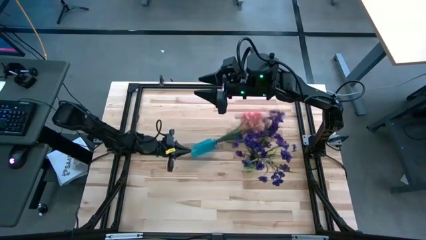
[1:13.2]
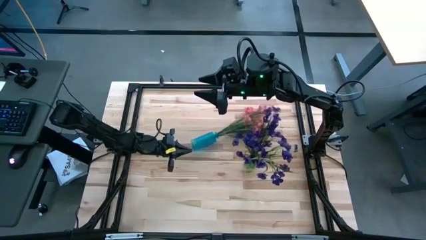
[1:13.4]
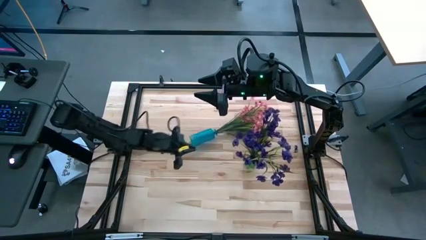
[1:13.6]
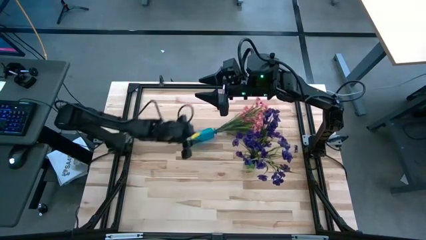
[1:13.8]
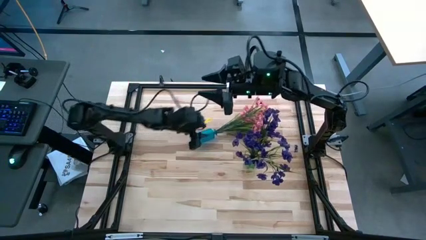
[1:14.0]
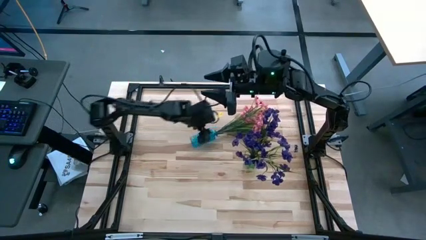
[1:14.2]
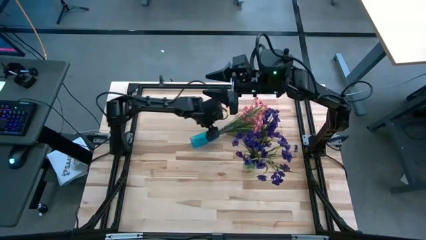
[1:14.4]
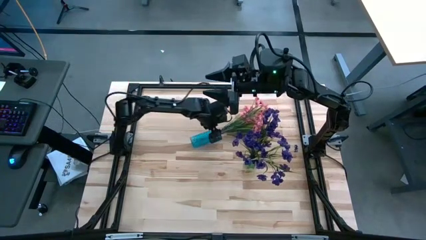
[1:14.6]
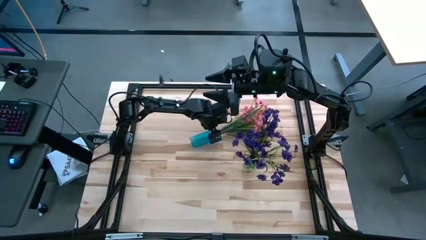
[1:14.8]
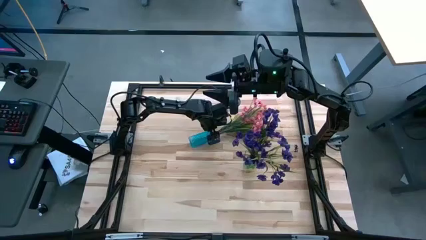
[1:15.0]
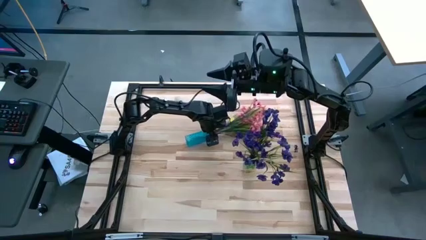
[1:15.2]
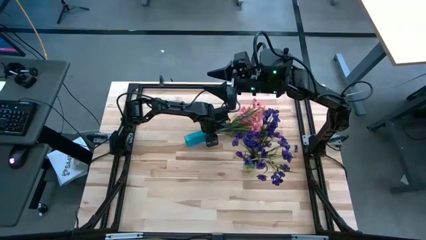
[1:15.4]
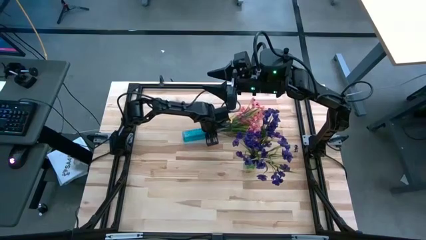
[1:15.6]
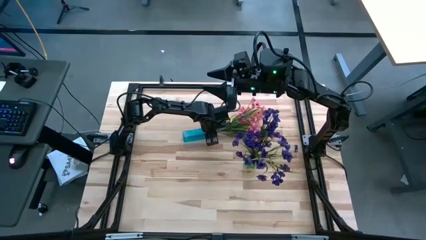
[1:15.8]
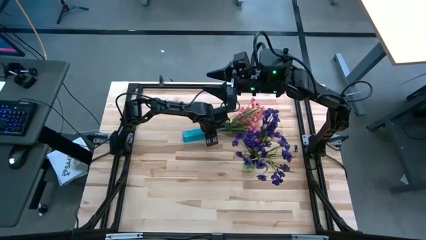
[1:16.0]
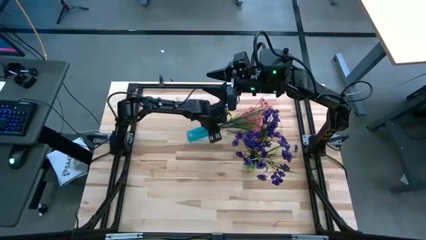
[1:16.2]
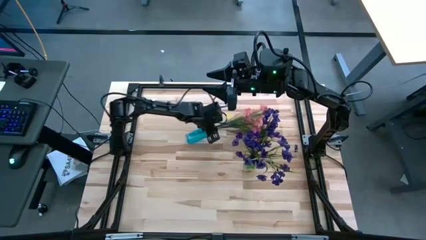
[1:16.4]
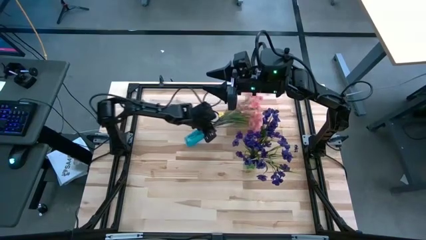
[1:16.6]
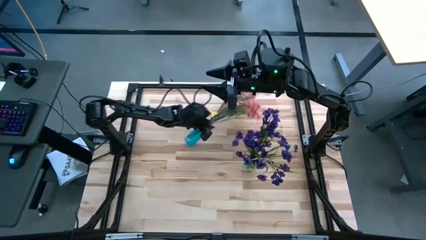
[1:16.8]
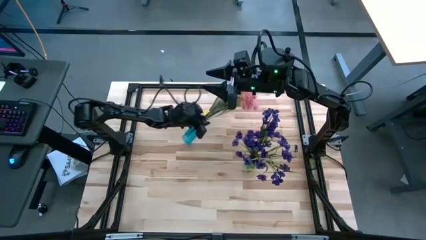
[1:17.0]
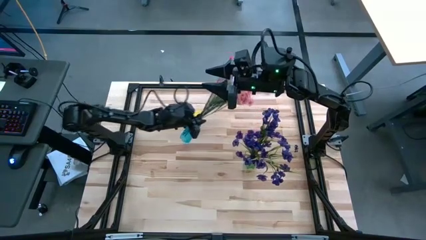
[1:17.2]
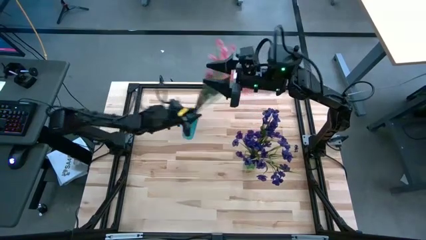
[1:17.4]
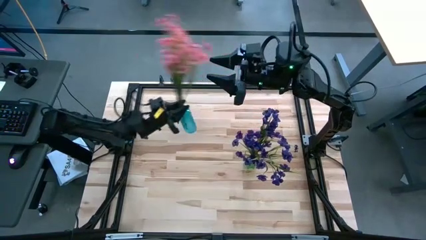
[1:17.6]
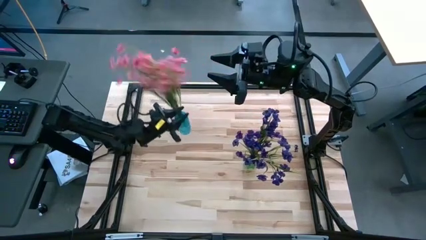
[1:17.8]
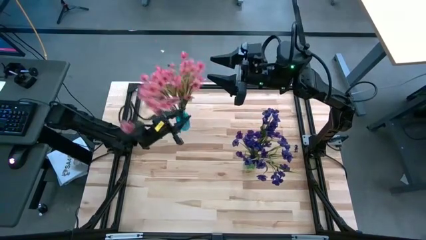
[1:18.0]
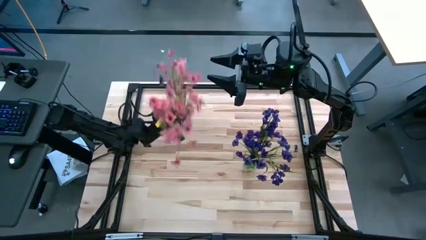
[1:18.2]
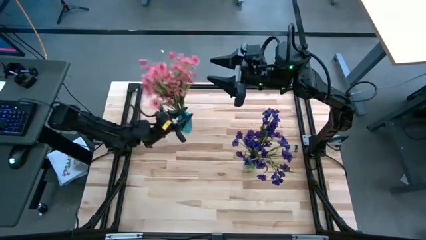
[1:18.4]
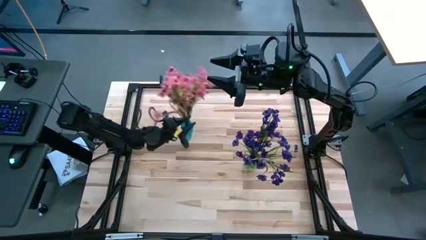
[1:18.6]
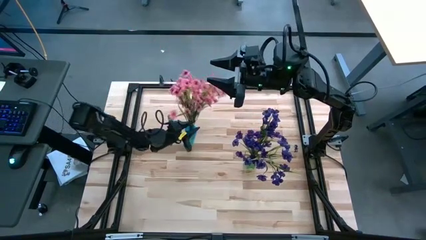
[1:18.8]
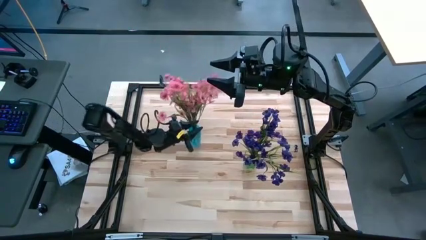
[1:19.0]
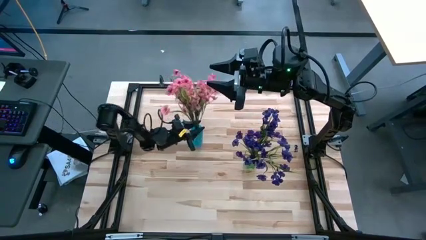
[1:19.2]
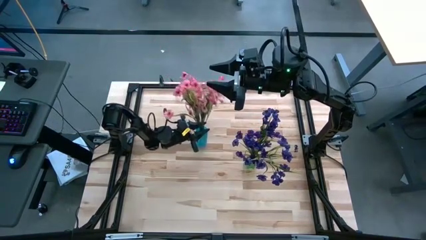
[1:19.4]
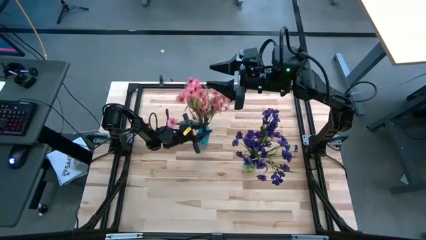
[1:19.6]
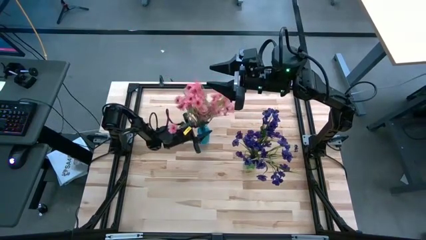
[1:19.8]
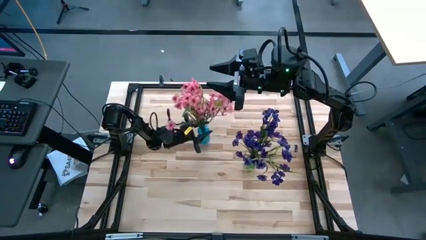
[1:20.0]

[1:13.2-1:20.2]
Task: Sort flowers into vase by color
Put the pink flowers into the blue vase

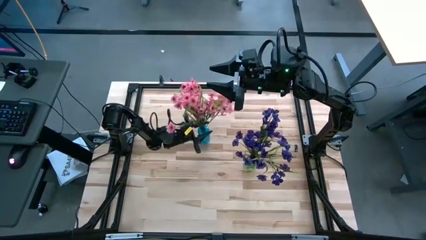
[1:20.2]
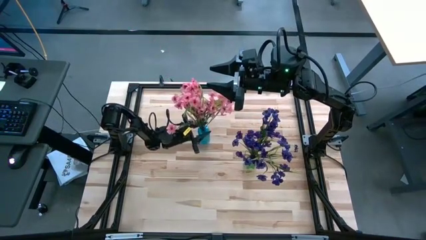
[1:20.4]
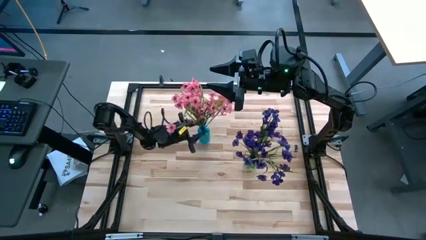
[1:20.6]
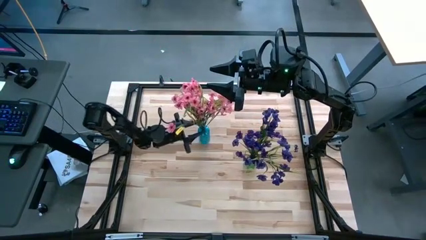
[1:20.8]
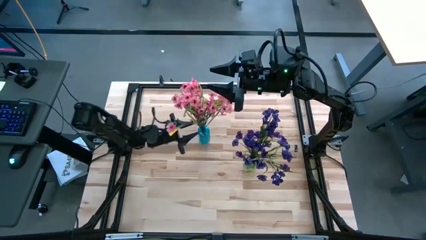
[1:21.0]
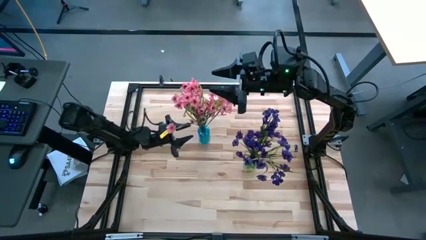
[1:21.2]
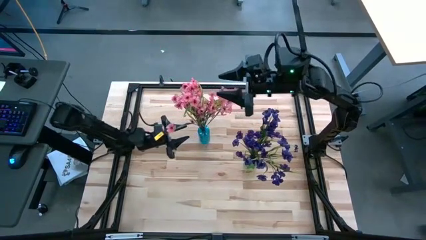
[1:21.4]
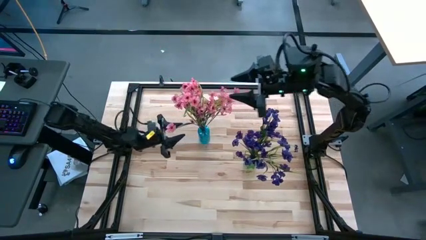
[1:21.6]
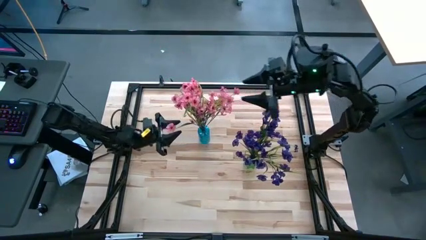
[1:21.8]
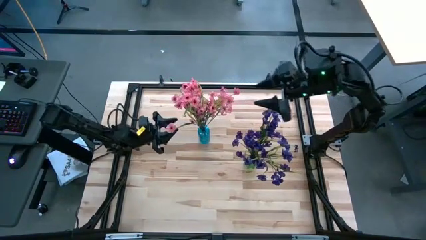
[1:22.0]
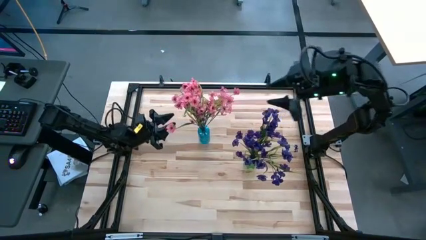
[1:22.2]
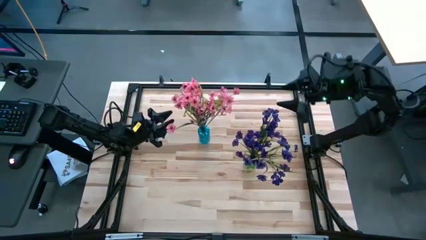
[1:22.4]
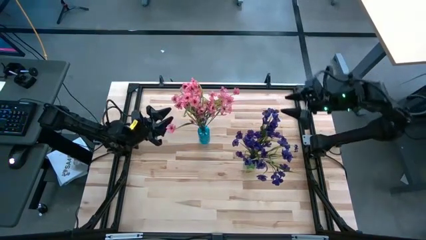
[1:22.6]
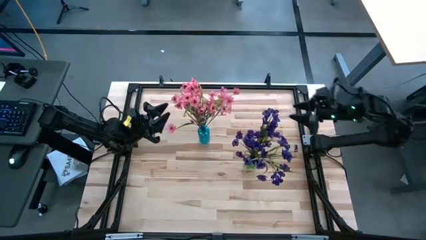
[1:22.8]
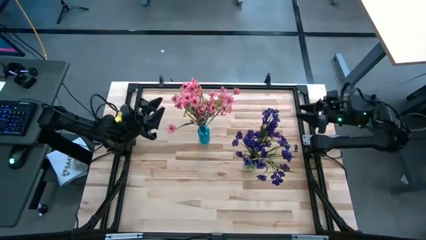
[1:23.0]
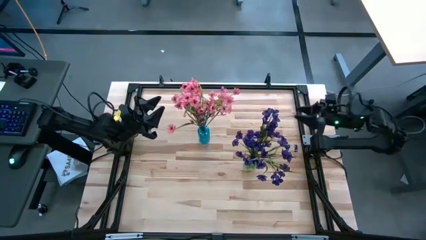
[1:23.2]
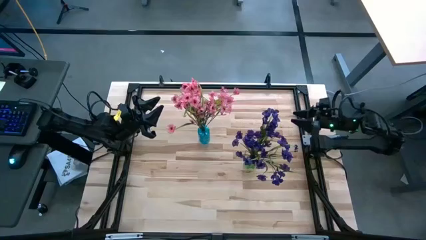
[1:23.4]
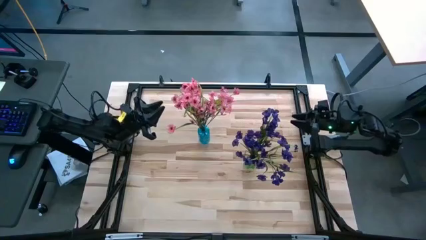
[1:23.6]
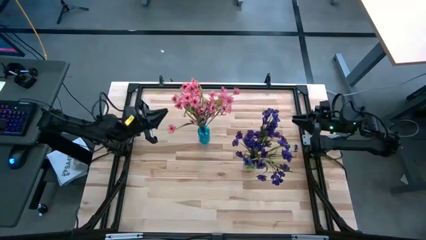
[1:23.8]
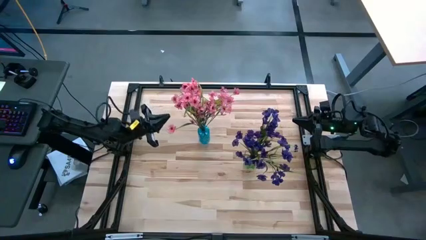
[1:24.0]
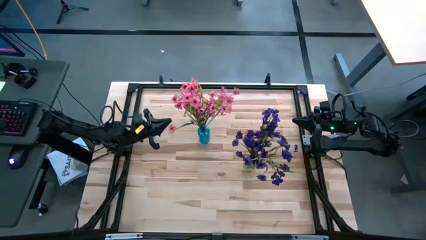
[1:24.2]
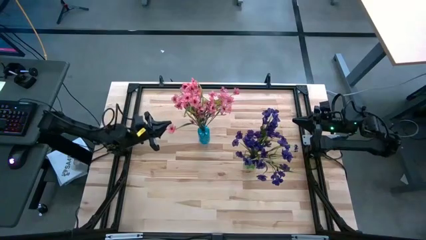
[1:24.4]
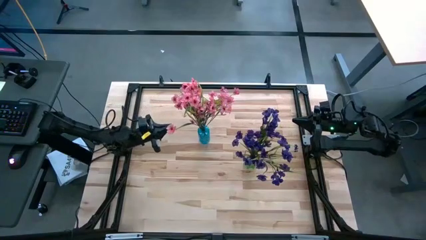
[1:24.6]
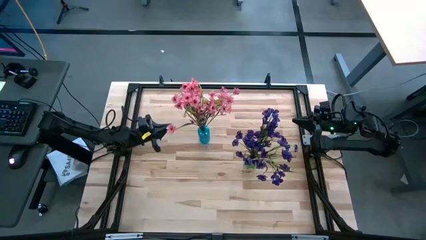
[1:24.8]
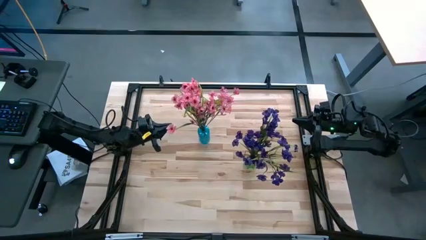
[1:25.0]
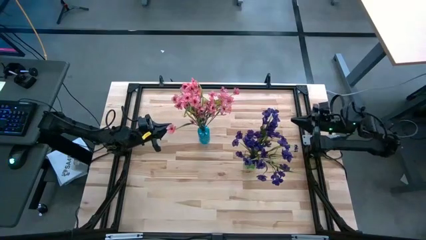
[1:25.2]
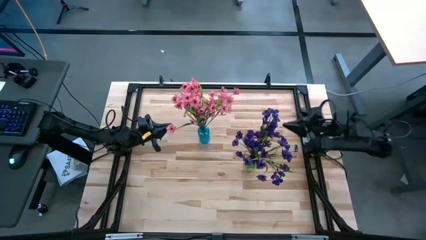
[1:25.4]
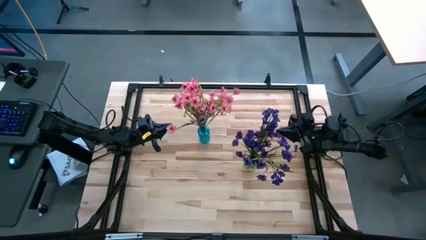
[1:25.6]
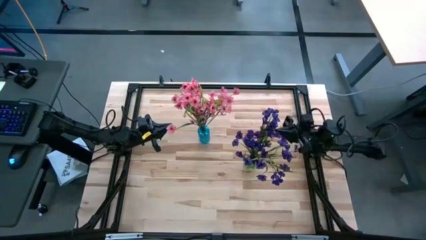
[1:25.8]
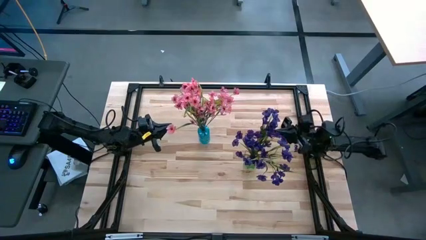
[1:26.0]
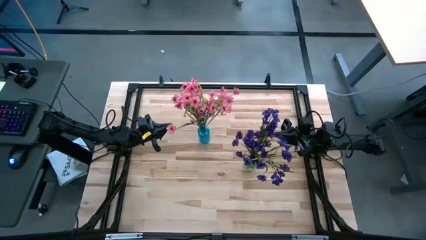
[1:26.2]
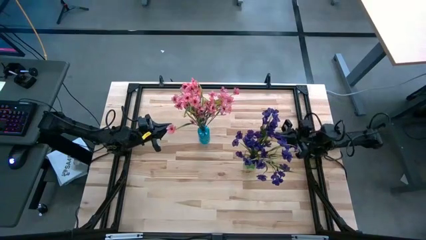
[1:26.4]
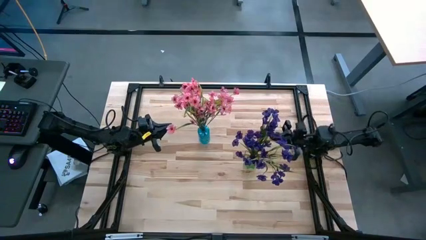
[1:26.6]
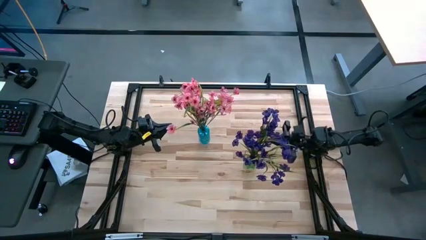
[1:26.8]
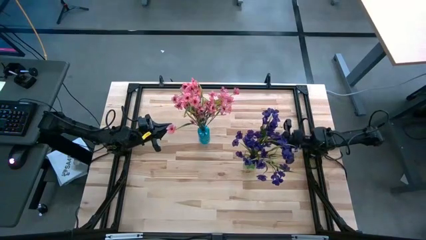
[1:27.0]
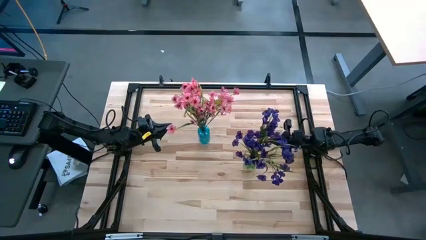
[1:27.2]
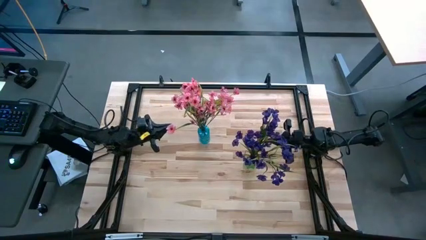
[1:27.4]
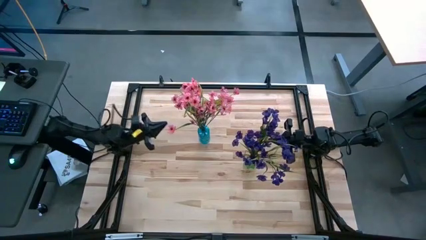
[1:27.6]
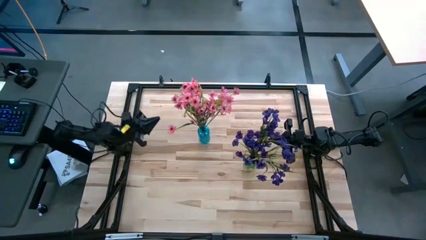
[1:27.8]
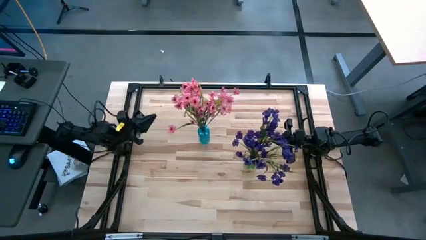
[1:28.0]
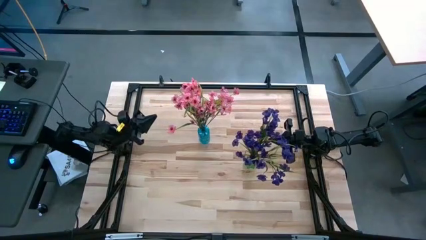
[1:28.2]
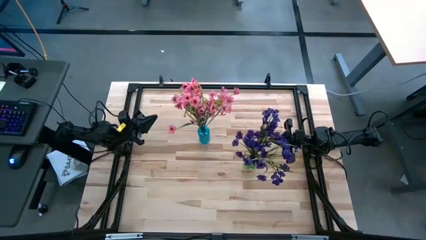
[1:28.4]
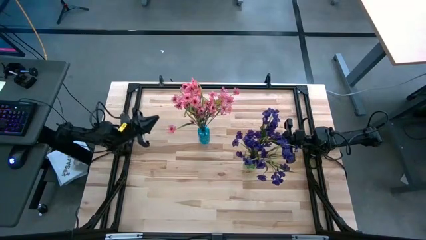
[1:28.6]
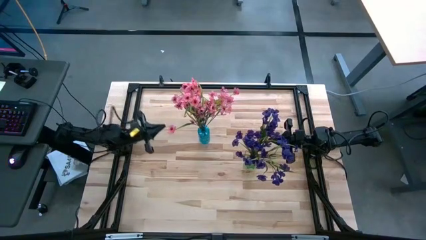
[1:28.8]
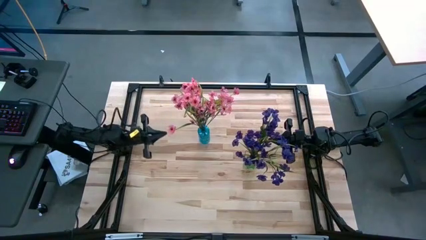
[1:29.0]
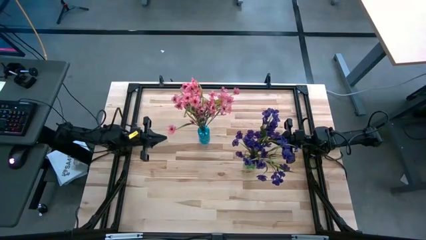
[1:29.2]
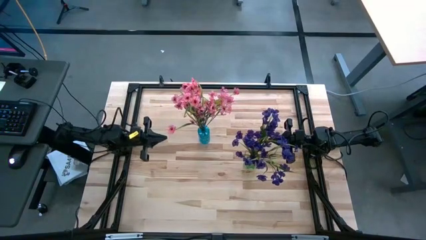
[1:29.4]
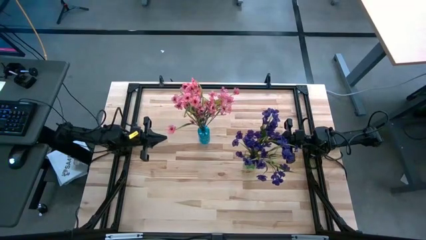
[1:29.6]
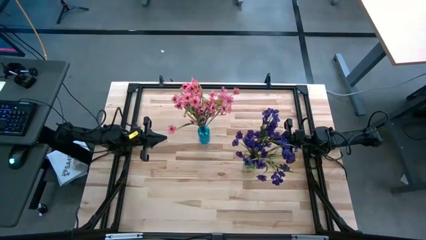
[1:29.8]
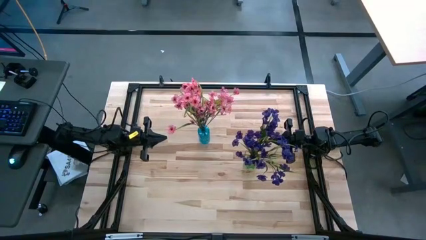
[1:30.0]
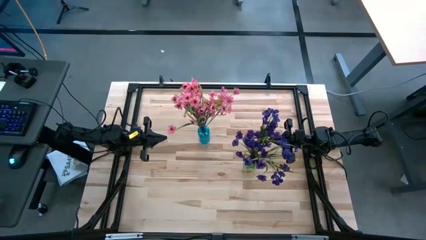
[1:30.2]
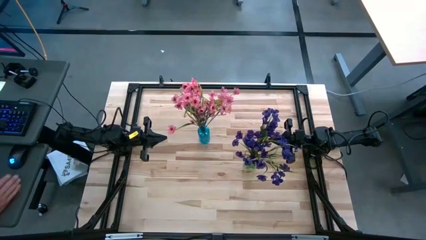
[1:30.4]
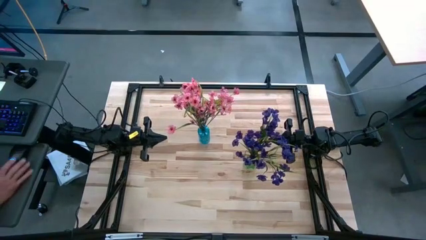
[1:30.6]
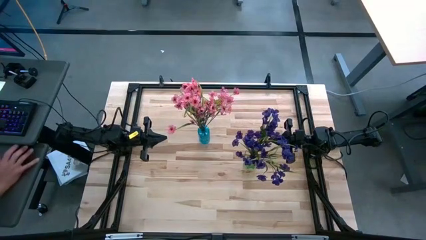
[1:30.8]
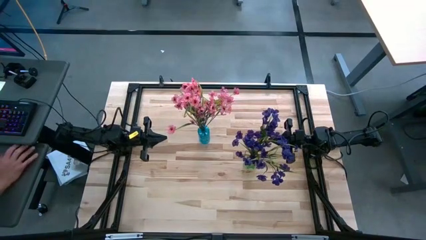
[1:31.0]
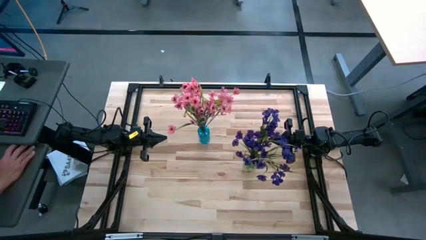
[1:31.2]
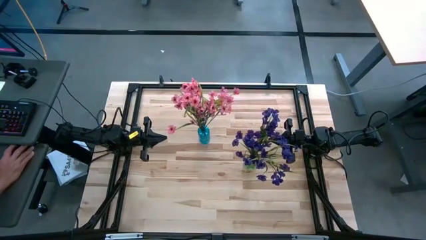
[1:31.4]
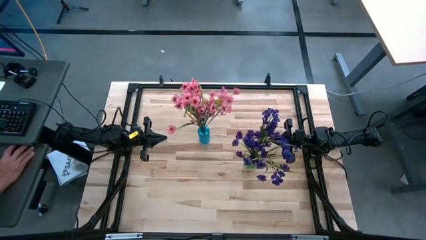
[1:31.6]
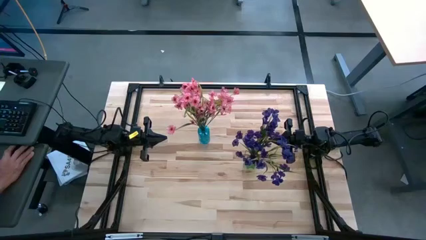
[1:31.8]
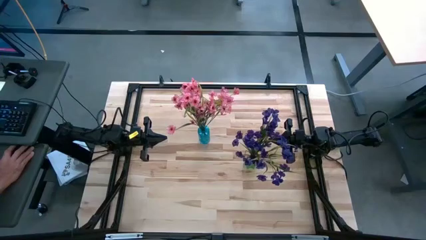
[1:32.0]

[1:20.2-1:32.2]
Return to Home Position
